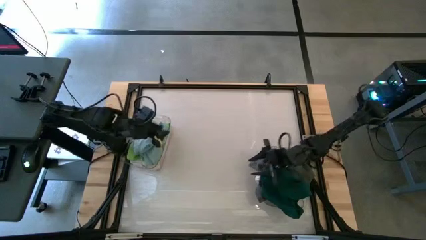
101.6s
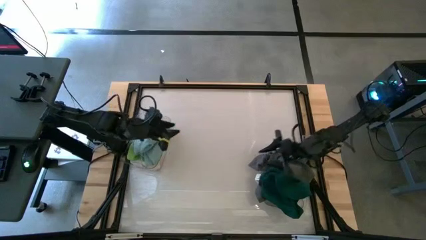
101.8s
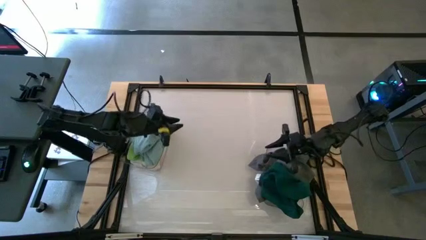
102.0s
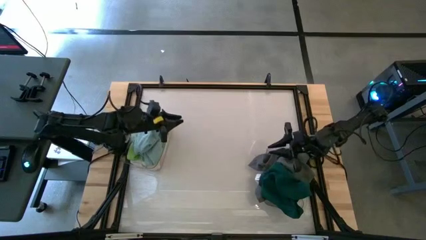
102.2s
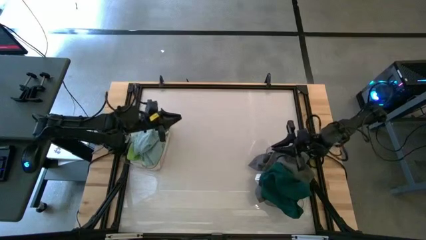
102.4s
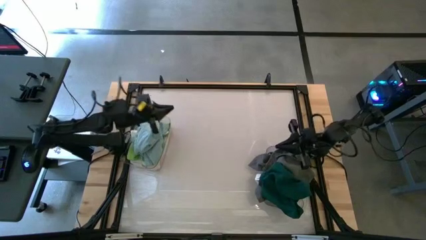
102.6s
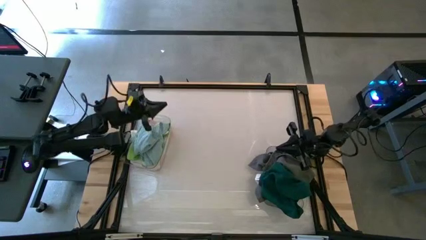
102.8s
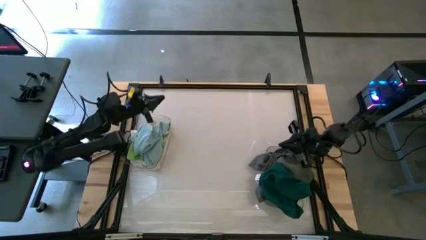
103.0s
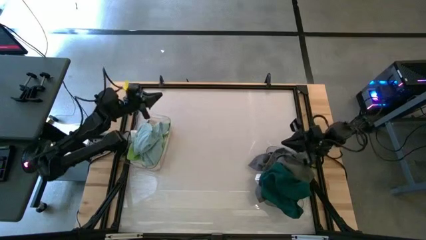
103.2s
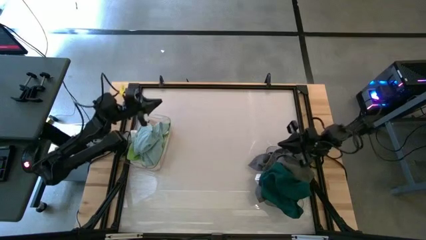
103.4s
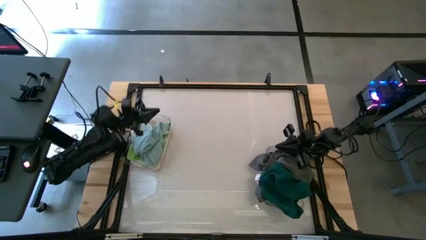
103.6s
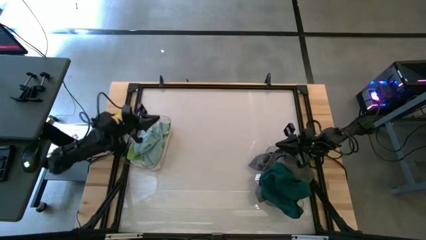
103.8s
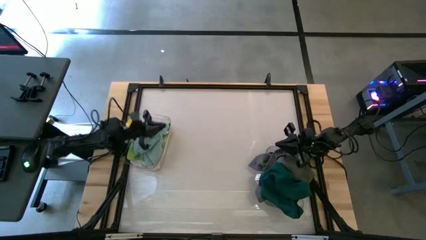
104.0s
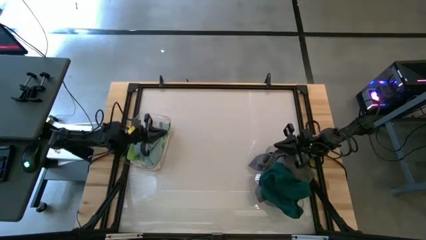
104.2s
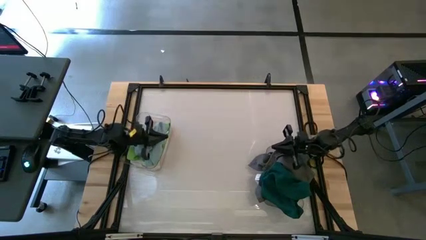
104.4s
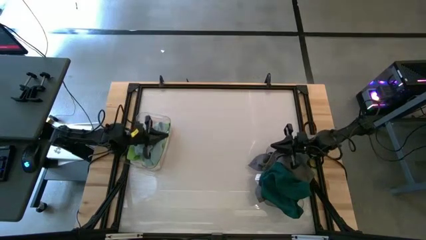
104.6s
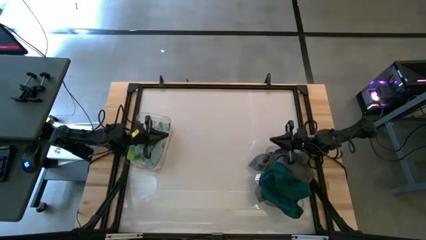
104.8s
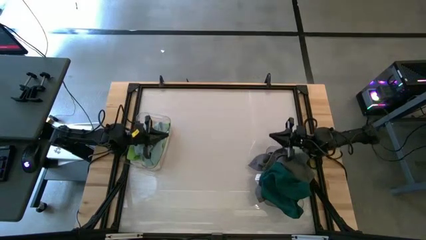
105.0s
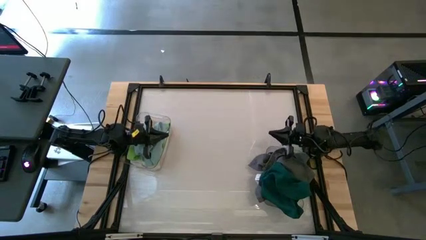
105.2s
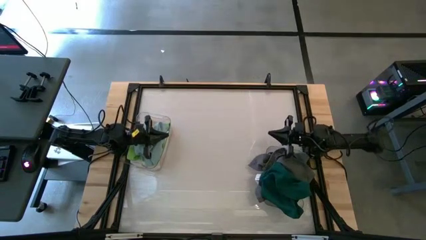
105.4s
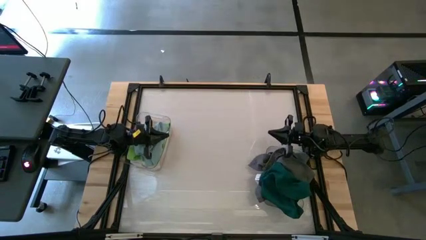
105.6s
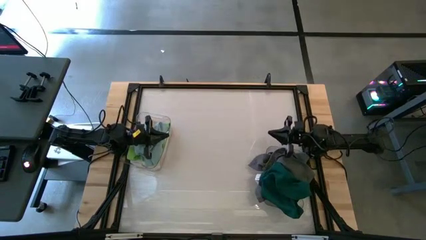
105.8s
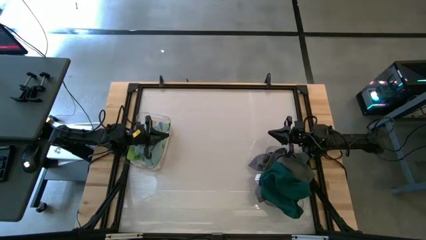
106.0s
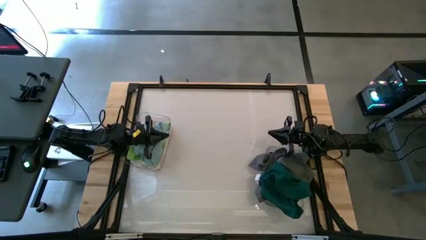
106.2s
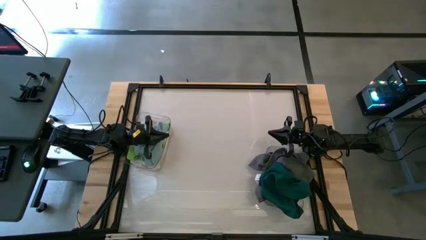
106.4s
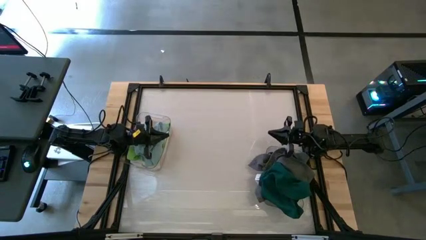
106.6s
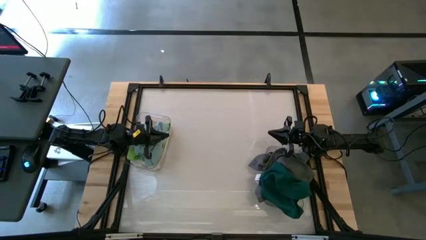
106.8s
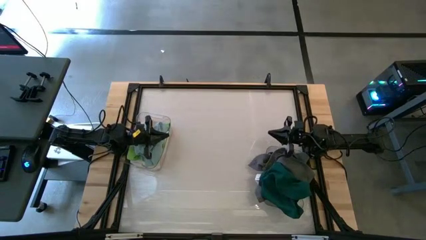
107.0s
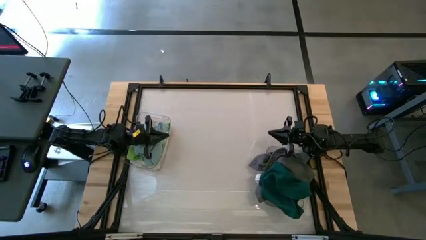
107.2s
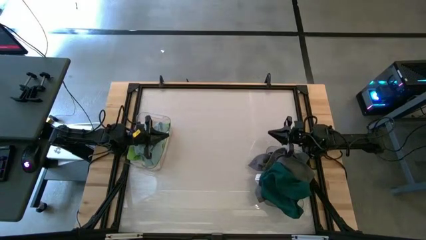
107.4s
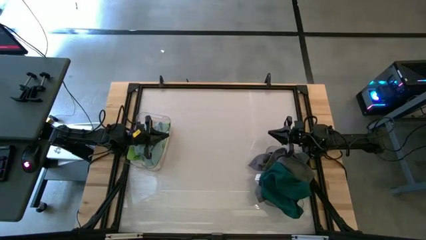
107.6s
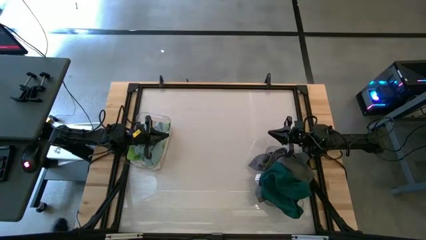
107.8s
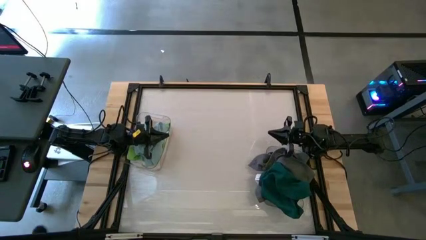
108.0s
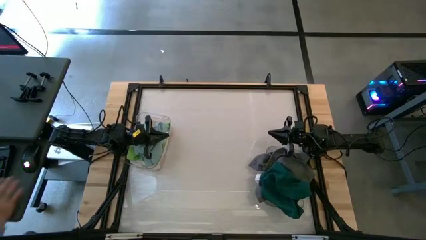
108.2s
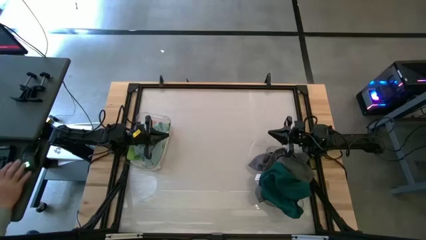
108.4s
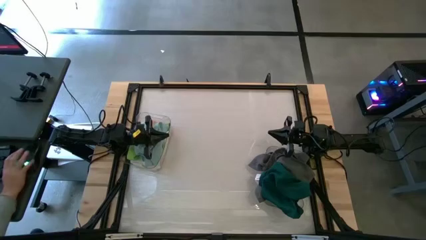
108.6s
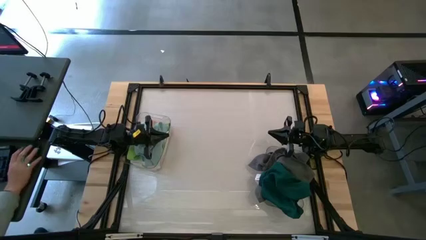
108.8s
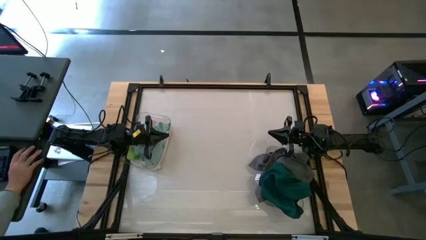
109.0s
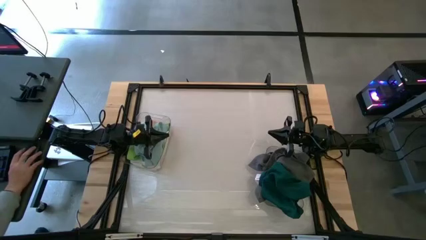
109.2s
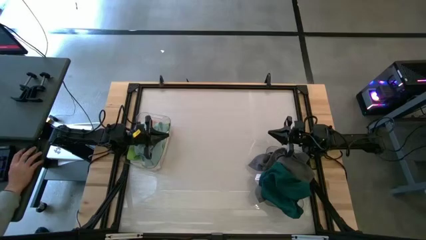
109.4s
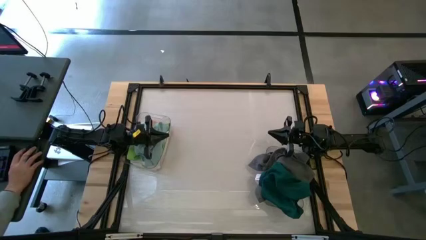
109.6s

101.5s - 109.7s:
Task: Sort towels by color in basket
Return to Home Position

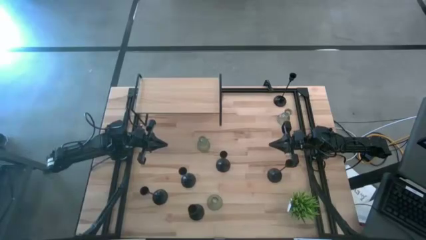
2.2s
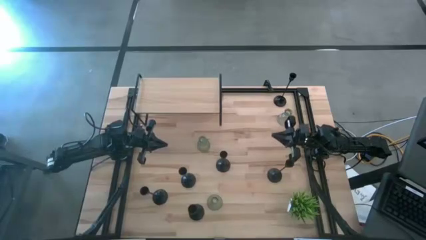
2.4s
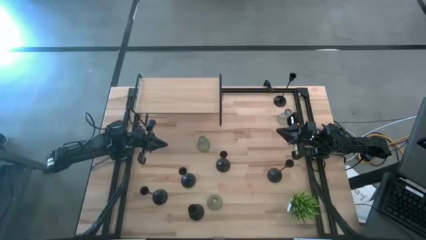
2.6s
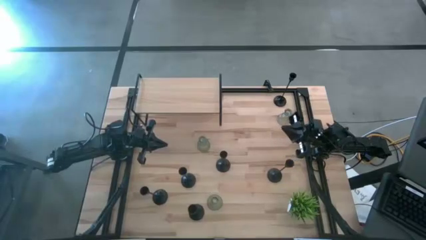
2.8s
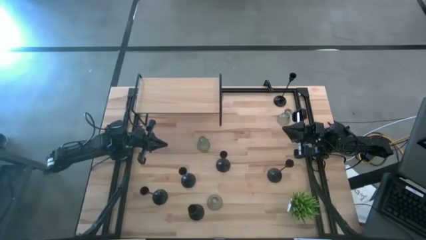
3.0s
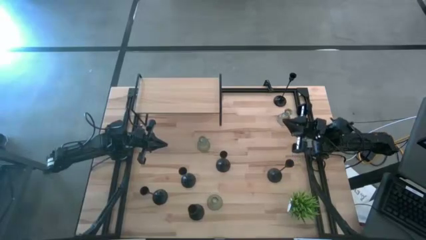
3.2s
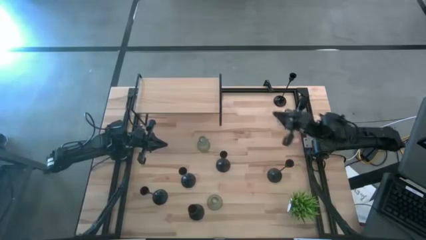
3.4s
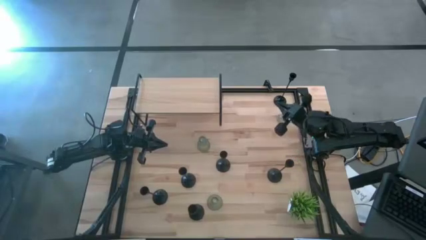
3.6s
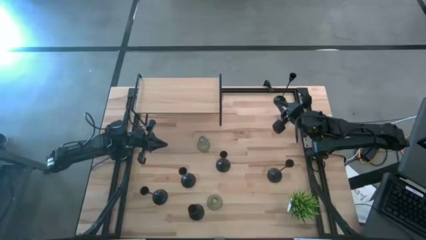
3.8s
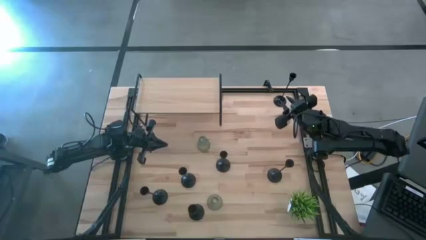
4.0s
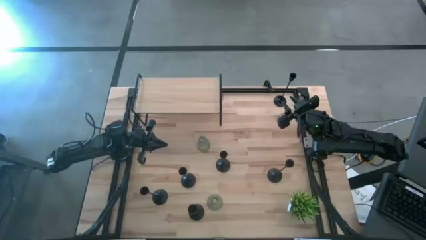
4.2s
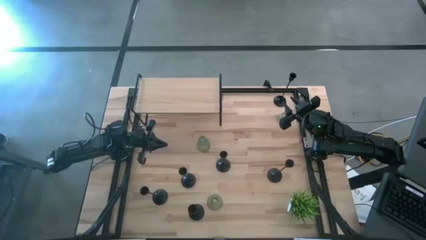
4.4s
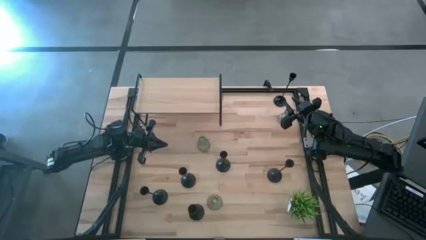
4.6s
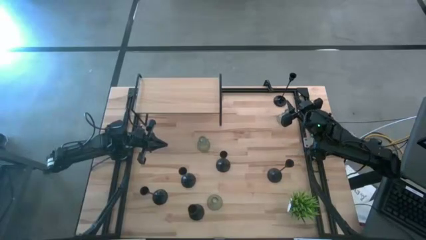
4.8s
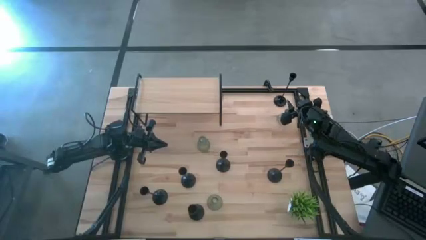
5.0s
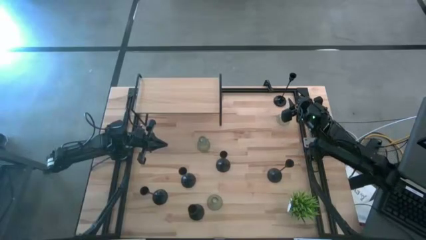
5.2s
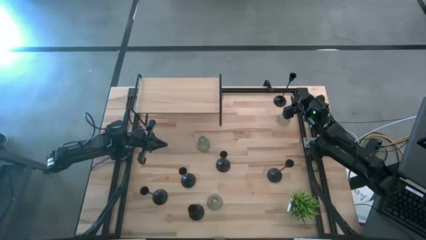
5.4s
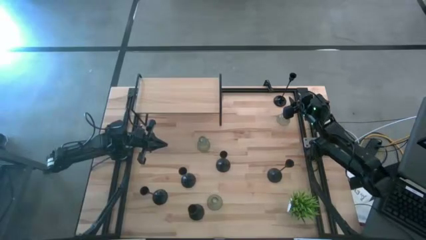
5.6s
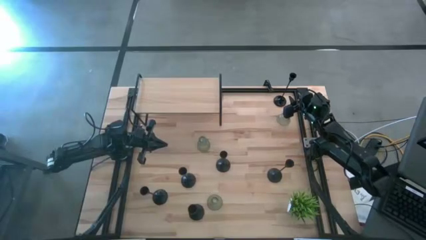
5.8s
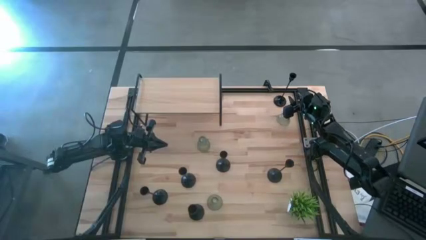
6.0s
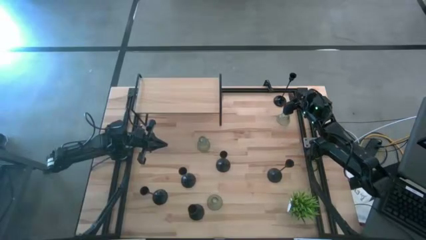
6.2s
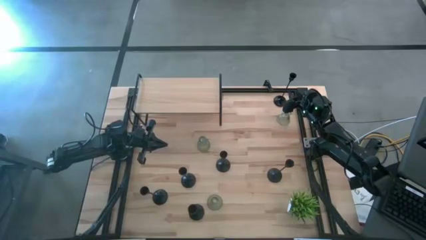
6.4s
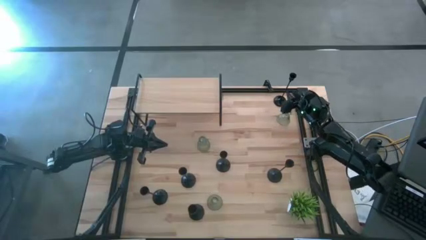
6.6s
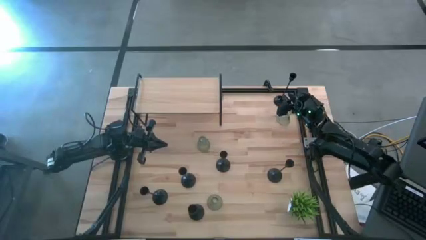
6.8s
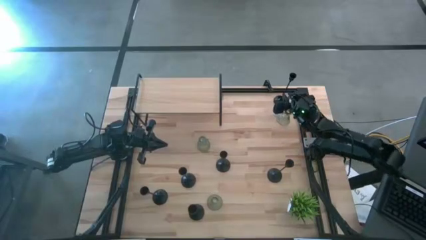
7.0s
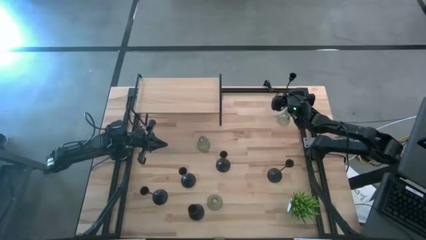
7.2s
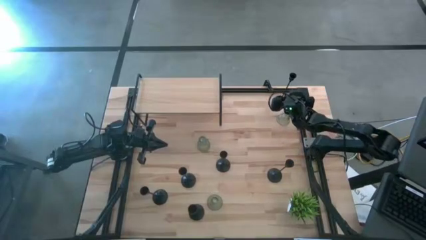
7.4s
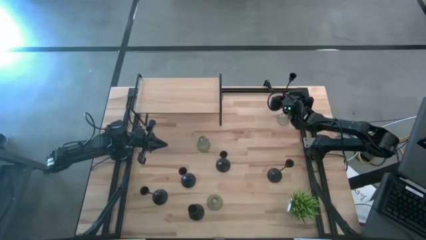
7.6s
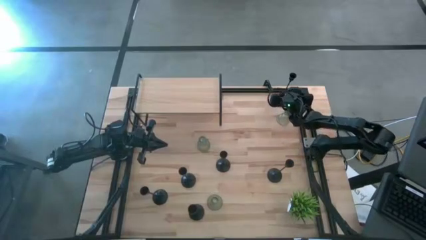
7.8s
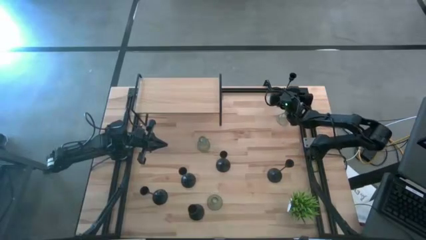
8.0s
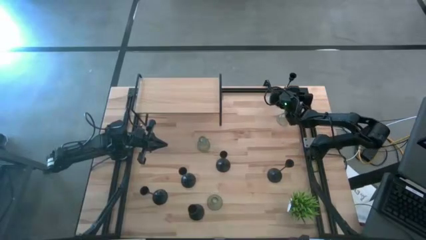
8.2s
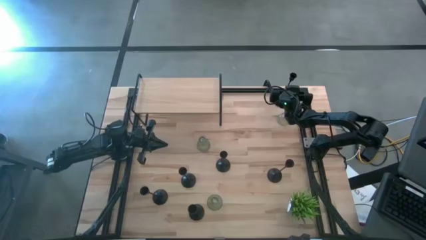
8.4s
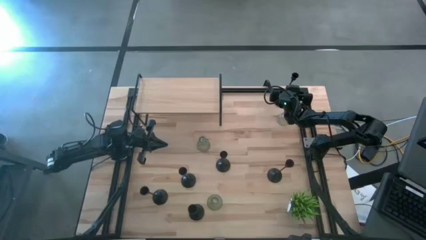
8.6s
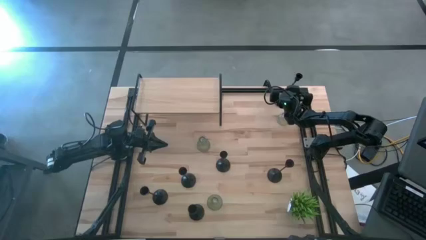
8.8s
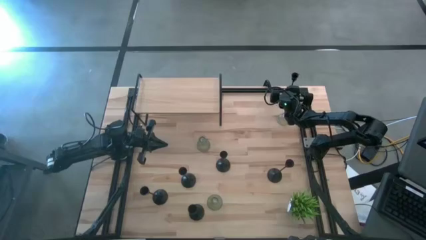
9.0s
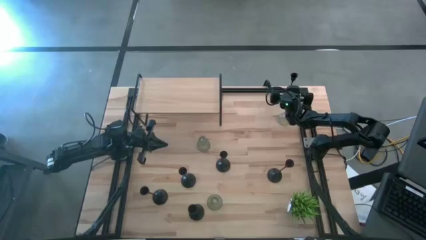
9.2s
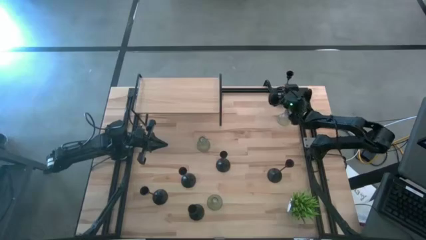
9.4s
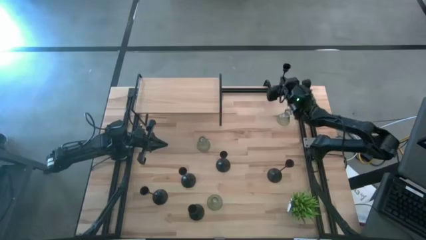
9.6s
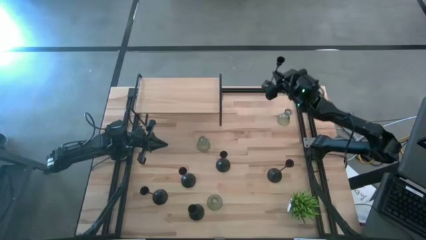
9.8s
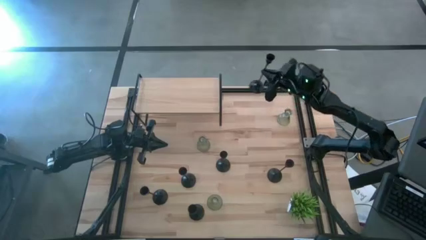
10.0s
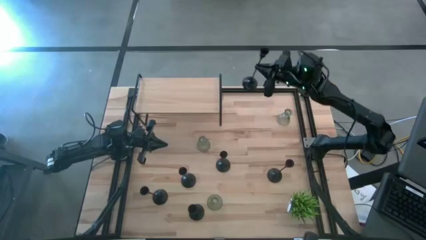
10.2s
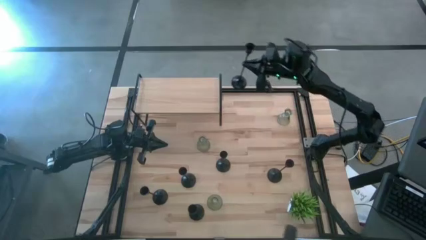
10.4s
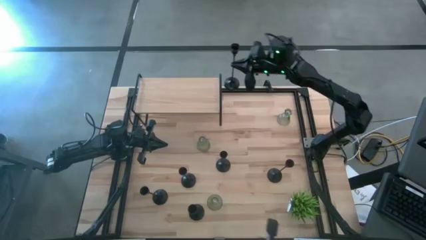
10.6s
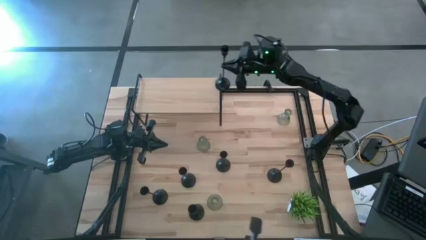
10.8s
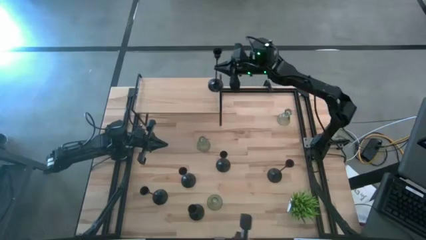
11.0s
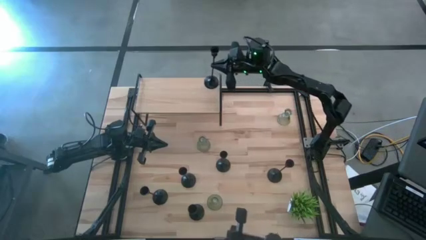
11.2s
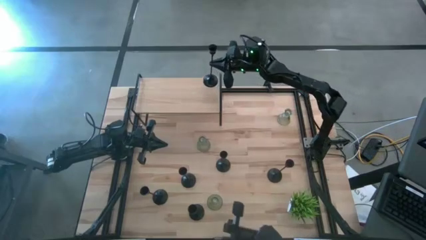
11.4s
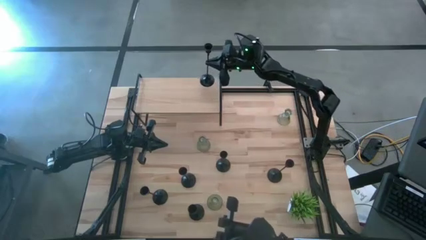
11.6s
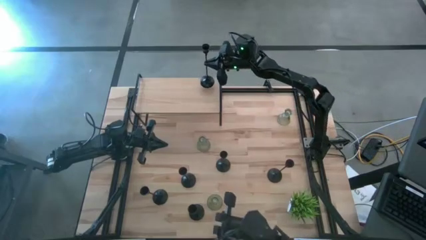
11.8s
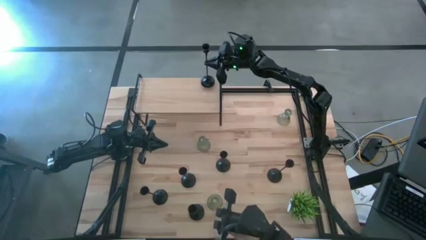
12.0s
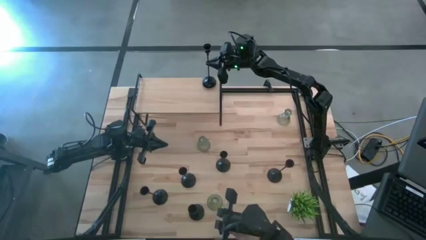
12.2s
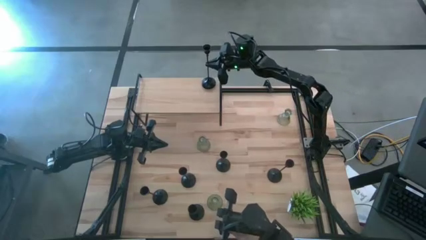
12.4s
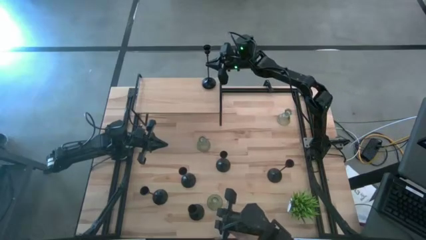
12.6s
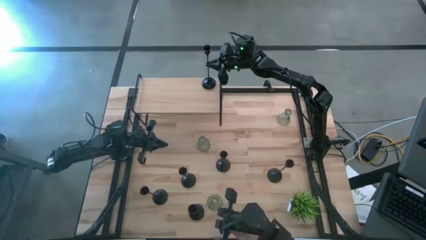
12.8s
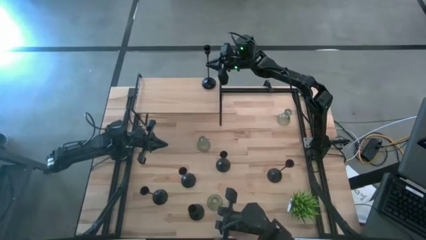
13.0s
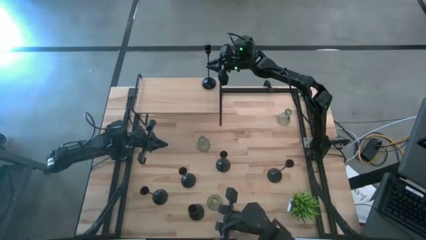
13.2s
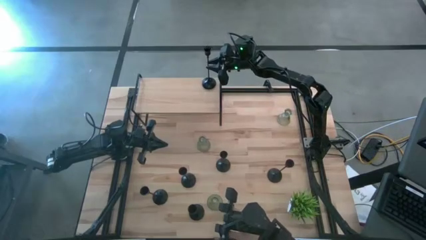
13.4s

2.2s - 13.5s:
Task: Pick & Place candle stick holders
Put the black candleholder on the shelf
